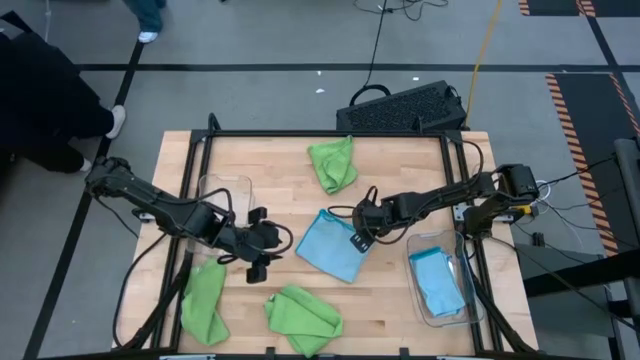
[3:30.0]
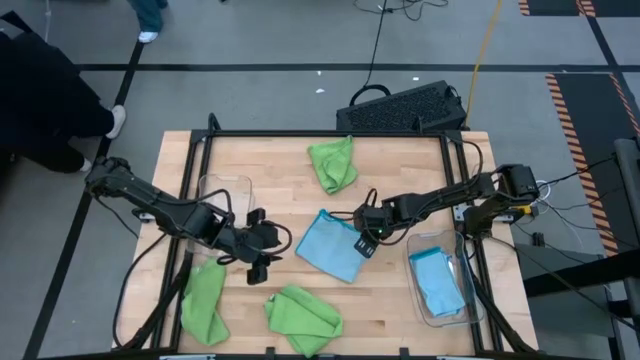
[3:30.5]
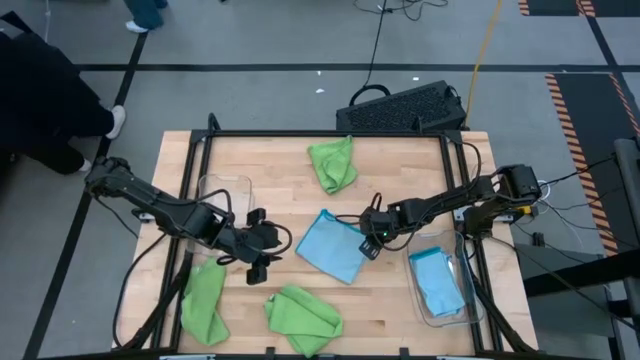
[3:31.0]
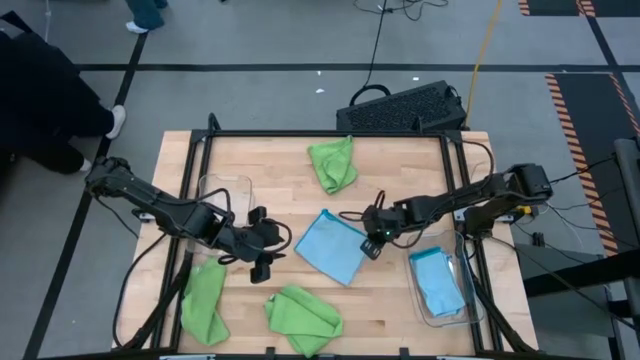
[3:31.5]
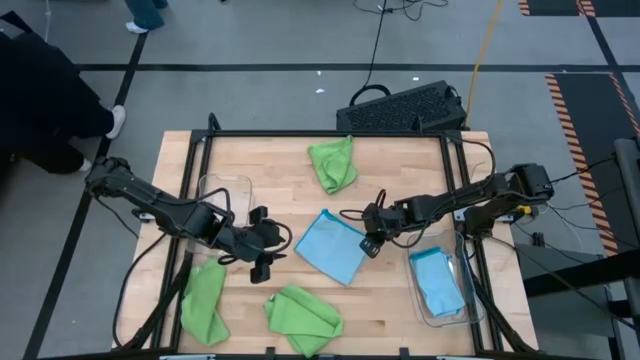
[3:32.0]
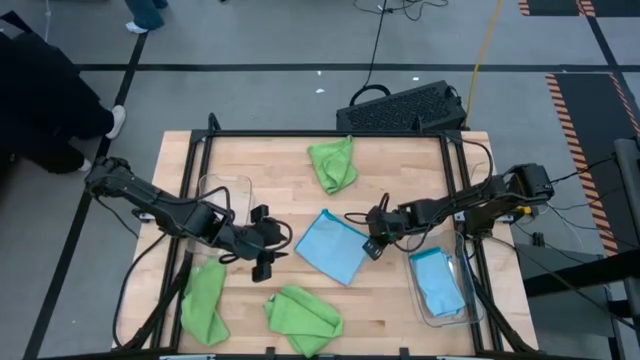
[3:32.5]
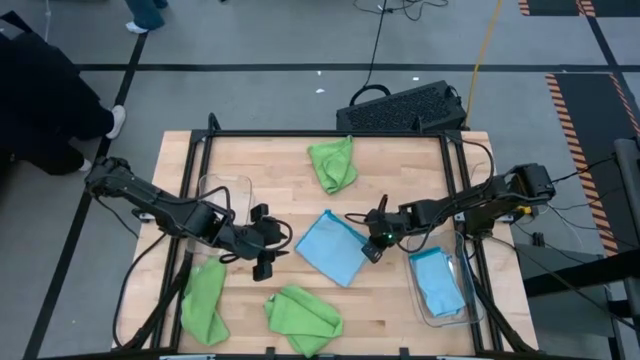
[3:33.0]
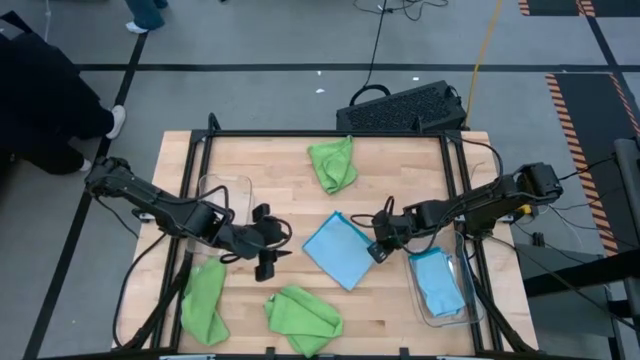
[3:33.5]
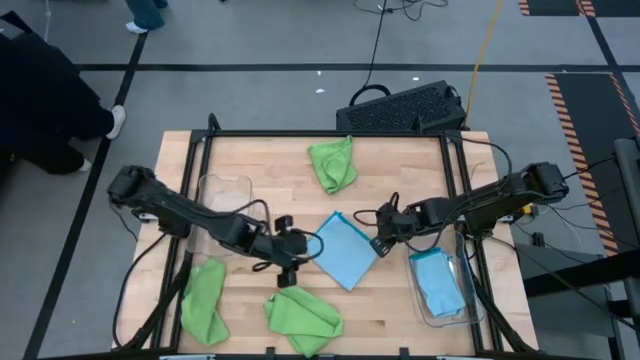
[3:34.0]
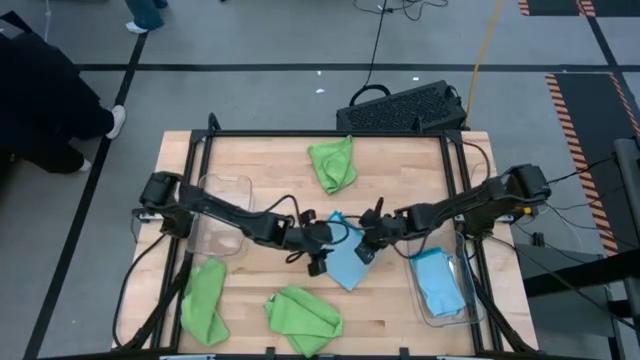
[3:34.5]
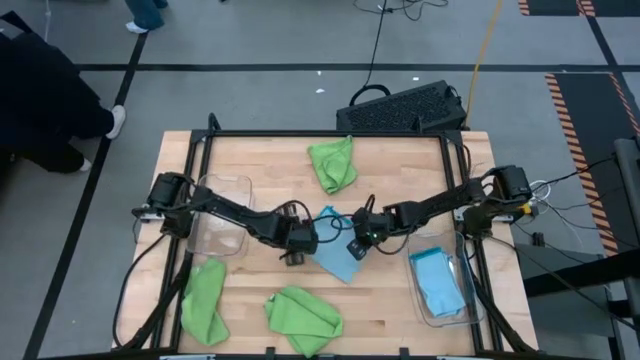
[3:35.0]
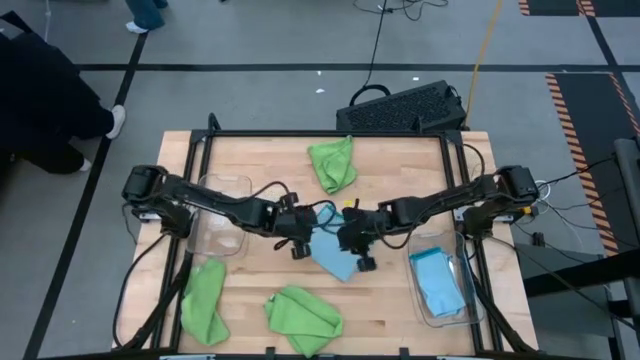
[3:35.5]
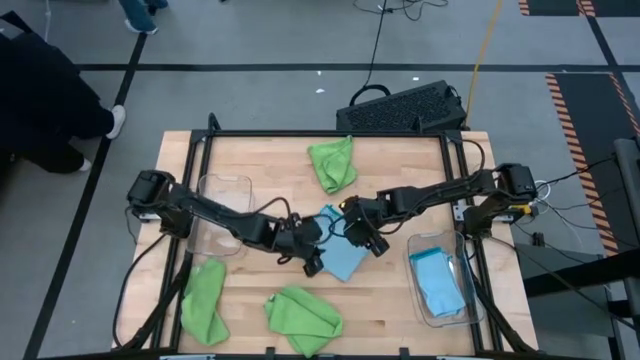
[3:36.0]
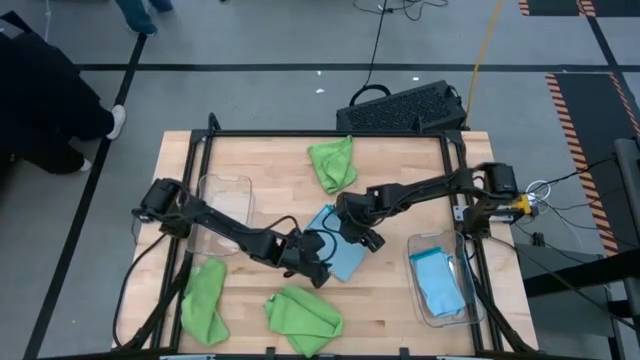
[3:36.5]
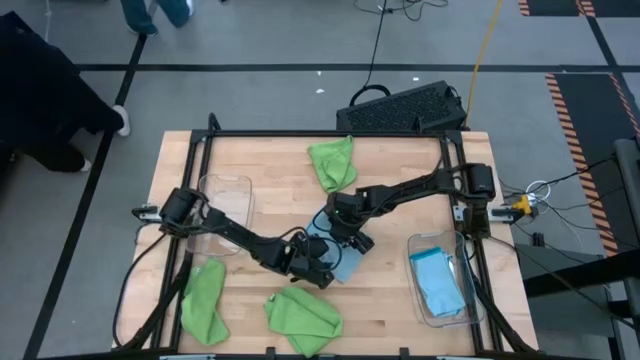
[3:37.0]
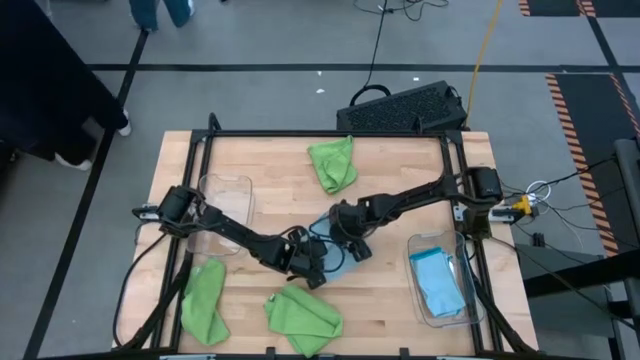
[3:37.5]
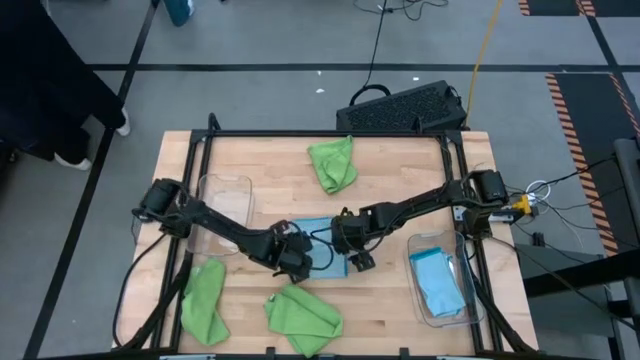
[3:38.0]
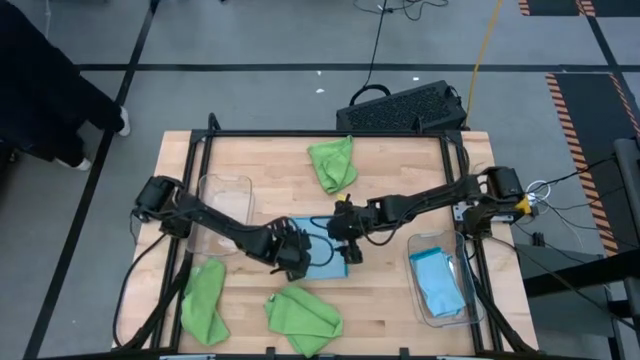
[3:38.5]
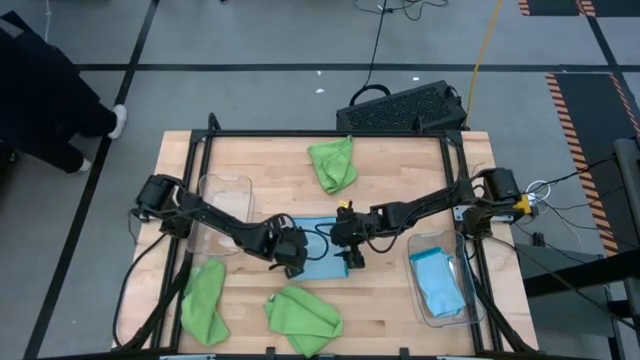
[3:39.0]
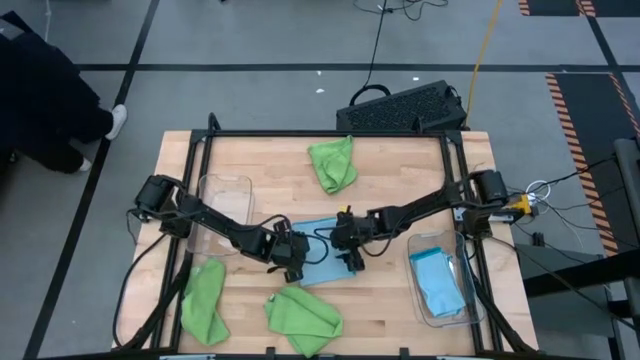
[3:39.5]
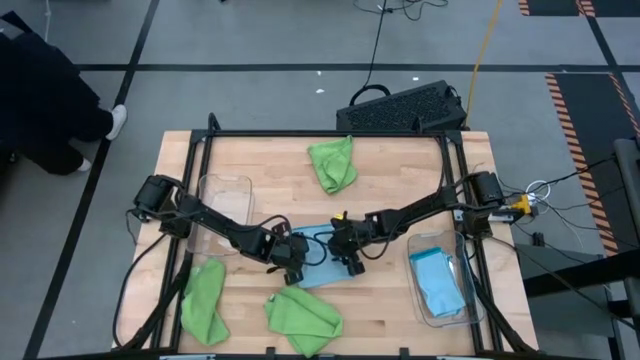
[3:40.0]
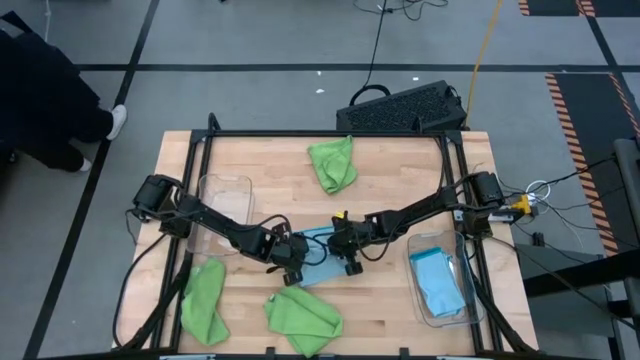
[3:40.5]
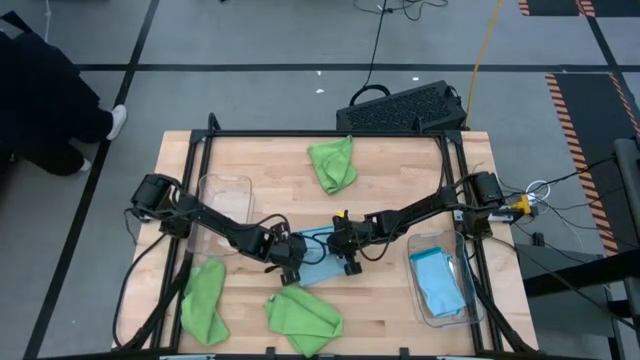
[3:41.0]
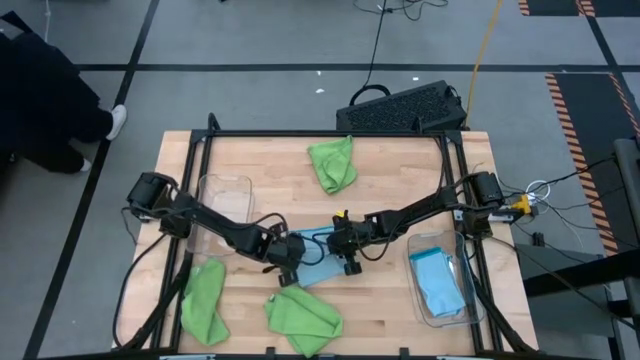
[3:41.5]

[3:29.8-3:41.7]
Task: Sort microfiber towel by color & place in baskets
Fold the blue microfiber towel

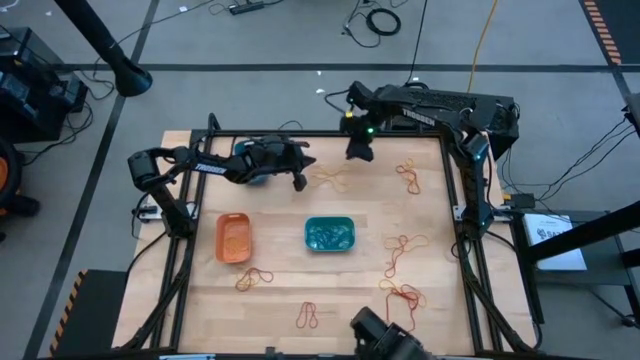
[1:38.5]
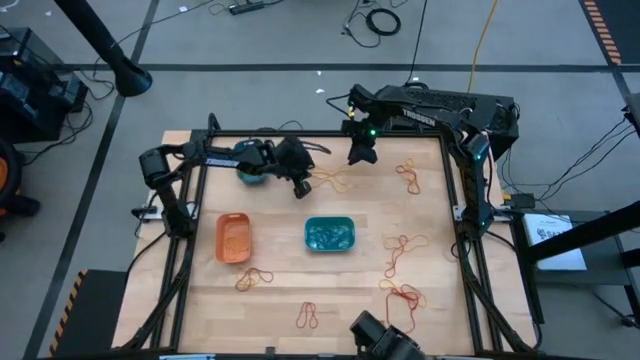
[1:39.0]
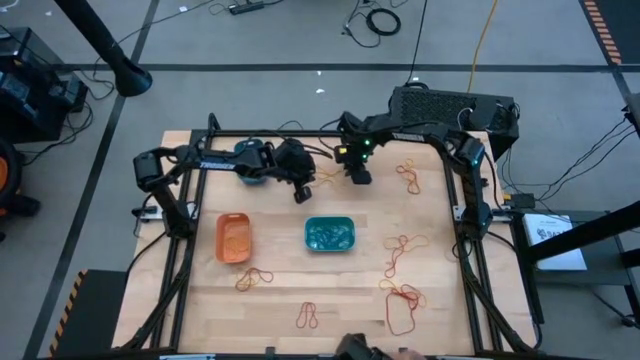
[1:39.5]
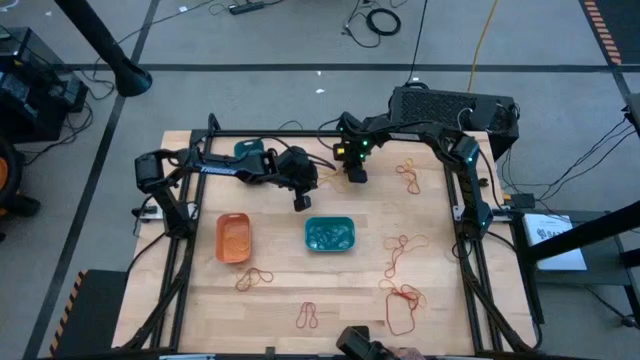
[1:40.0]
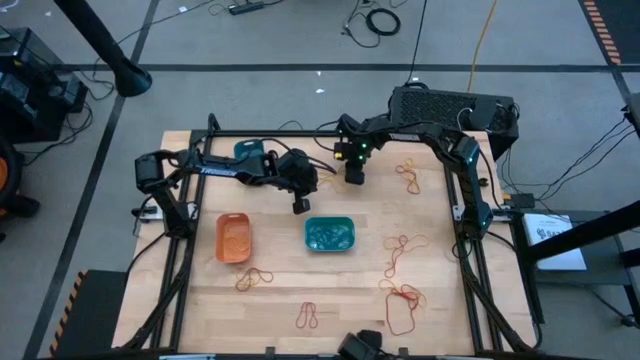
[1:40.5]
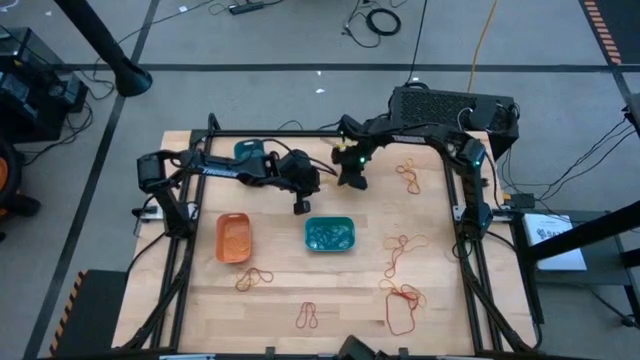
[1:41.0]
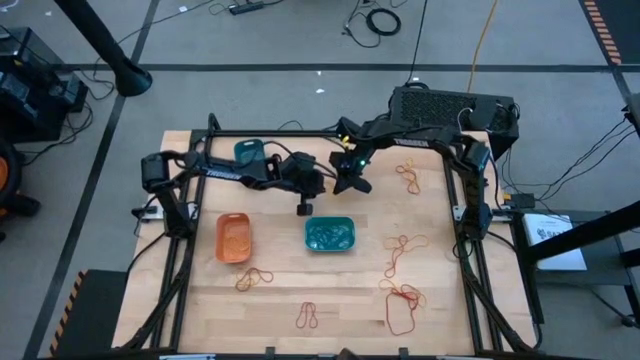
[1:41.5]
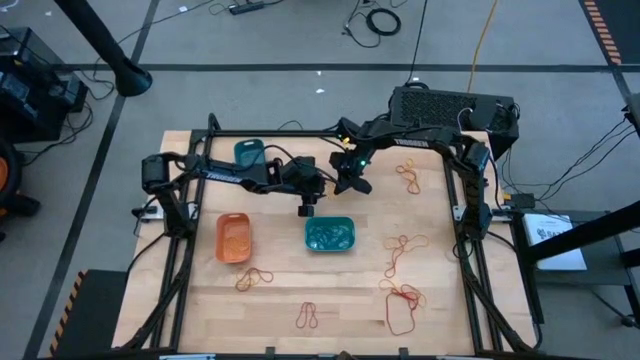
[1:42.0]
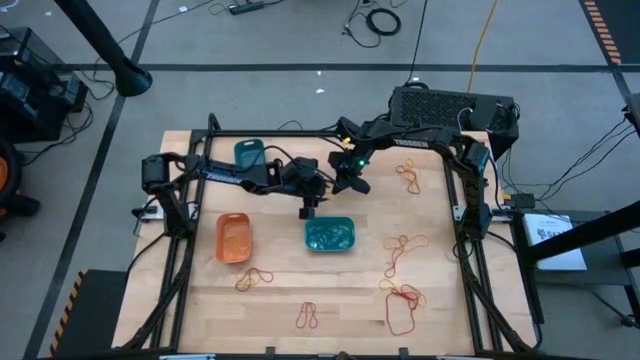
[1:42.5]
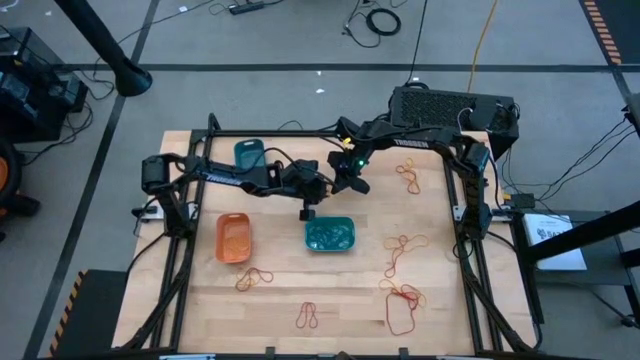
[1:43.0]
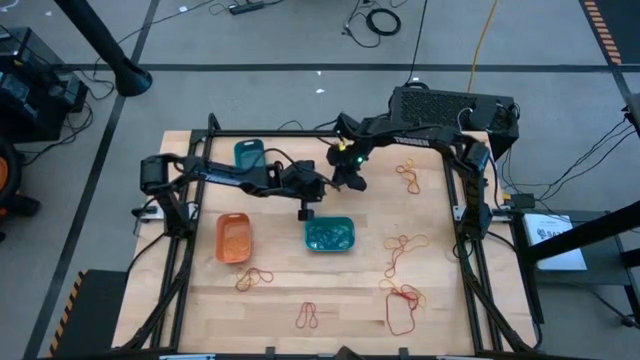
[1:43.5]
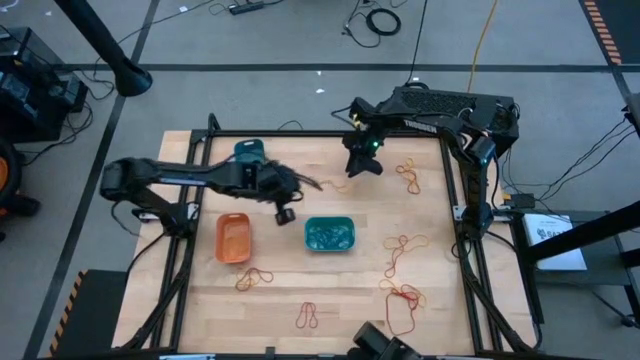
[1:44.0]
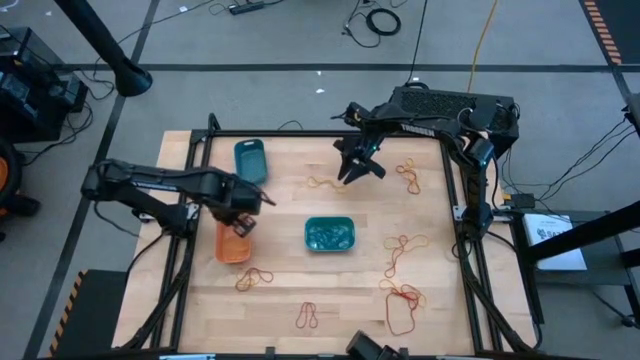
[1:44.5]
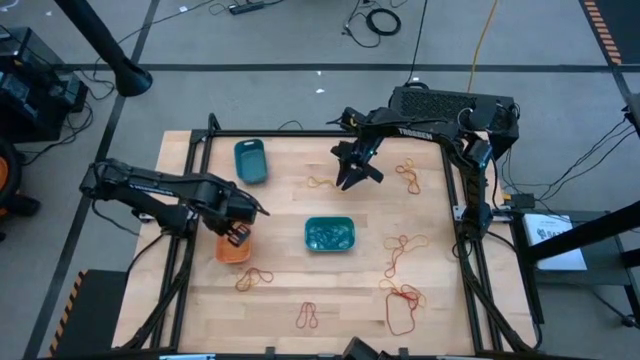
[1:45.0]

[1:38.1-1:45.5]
Task: Sort rubber bands into baskets
Put the yellow rubber band into the orange bin
